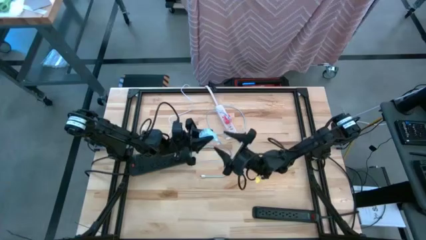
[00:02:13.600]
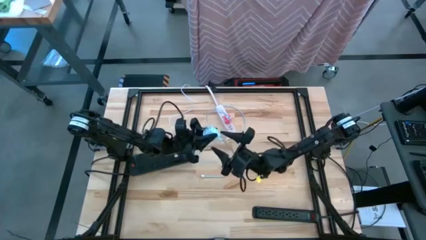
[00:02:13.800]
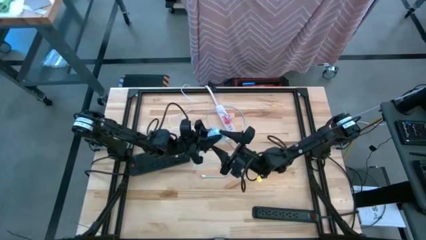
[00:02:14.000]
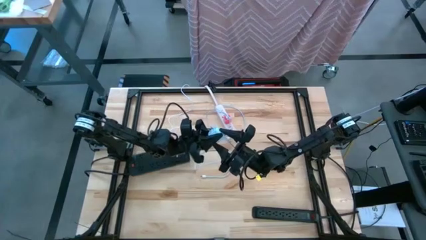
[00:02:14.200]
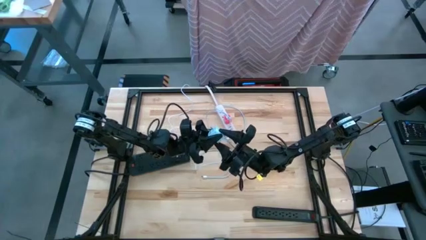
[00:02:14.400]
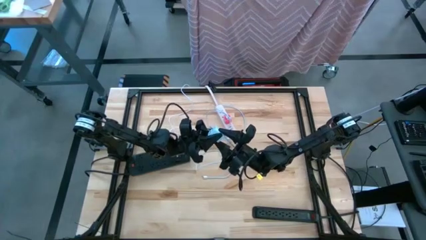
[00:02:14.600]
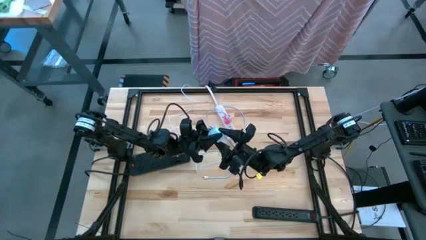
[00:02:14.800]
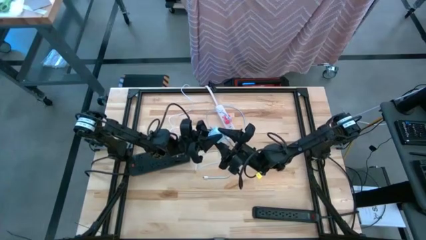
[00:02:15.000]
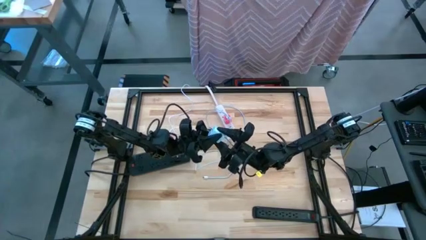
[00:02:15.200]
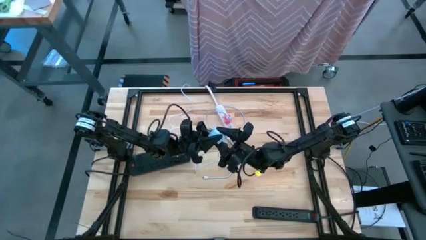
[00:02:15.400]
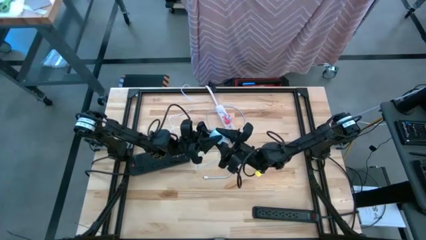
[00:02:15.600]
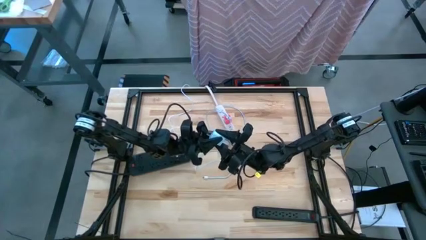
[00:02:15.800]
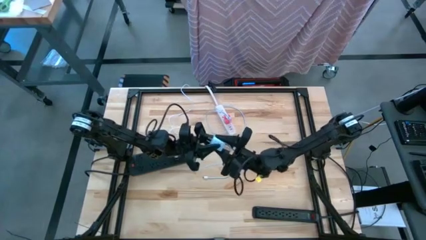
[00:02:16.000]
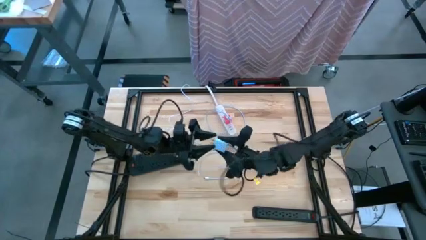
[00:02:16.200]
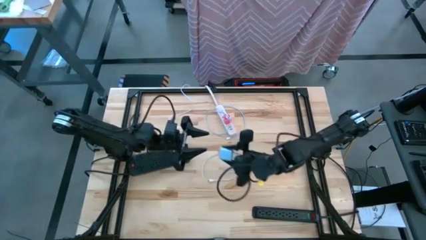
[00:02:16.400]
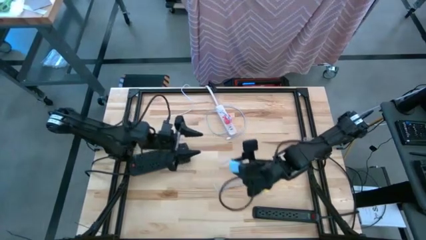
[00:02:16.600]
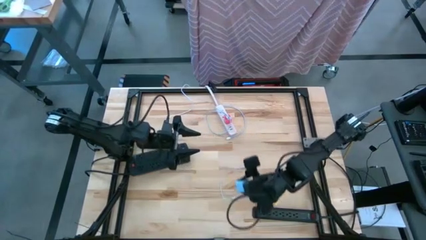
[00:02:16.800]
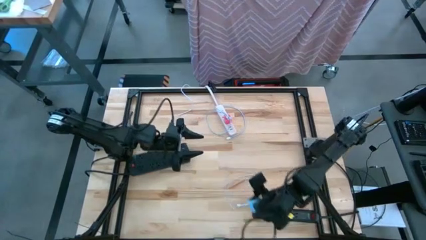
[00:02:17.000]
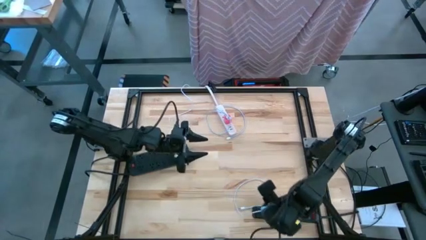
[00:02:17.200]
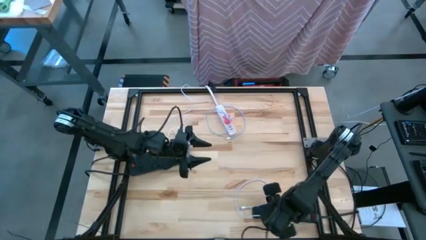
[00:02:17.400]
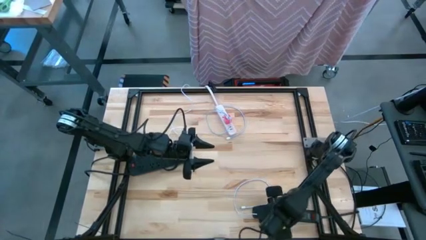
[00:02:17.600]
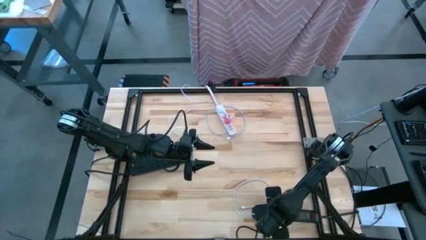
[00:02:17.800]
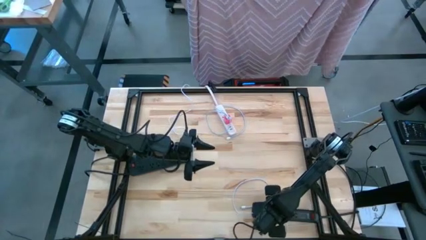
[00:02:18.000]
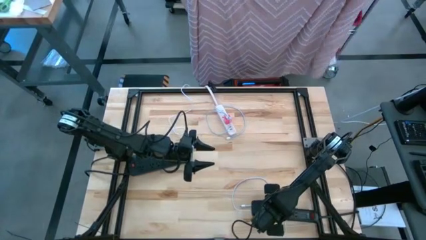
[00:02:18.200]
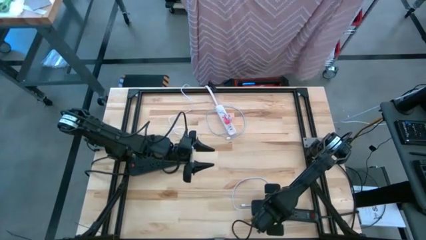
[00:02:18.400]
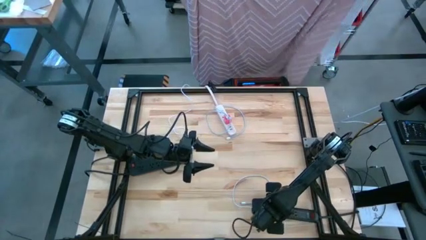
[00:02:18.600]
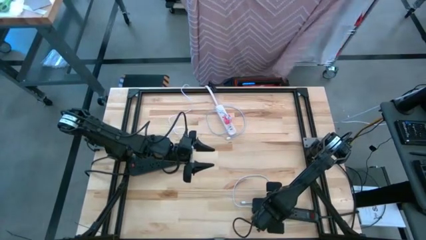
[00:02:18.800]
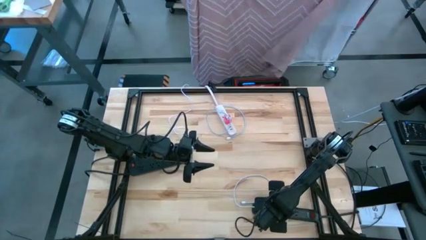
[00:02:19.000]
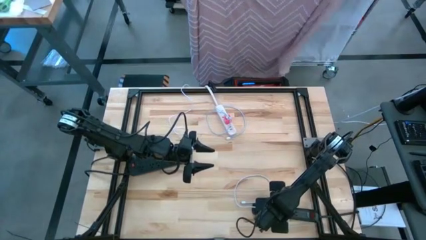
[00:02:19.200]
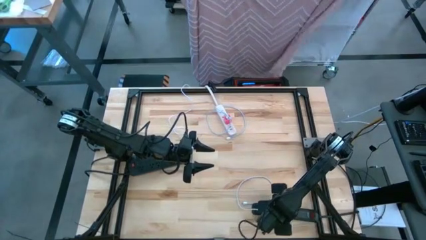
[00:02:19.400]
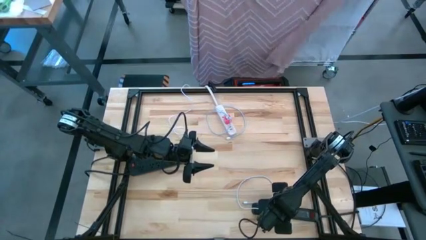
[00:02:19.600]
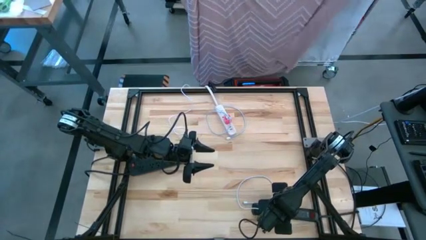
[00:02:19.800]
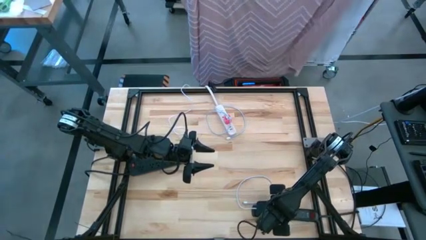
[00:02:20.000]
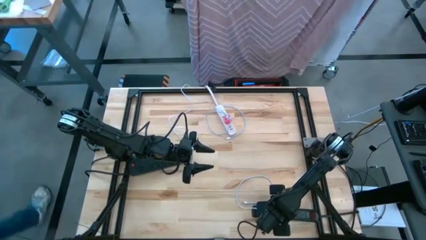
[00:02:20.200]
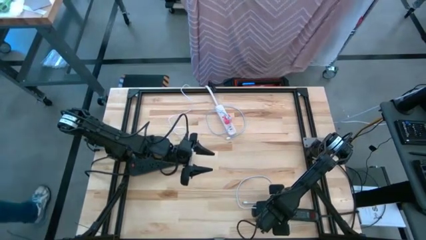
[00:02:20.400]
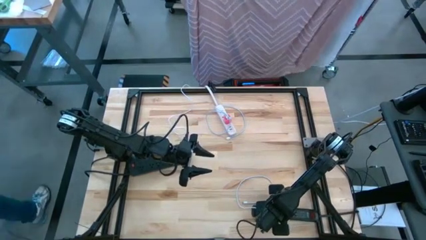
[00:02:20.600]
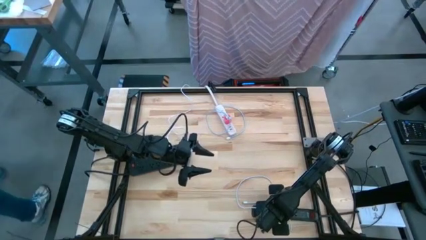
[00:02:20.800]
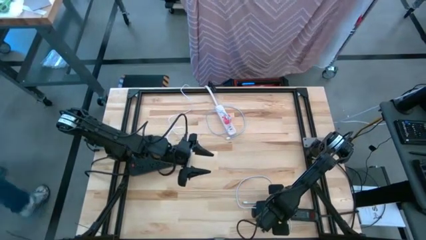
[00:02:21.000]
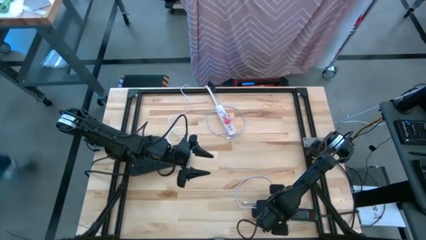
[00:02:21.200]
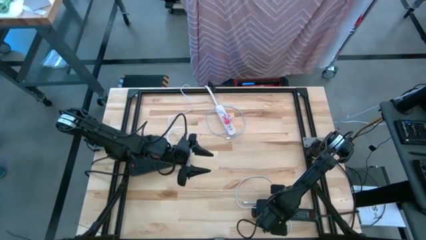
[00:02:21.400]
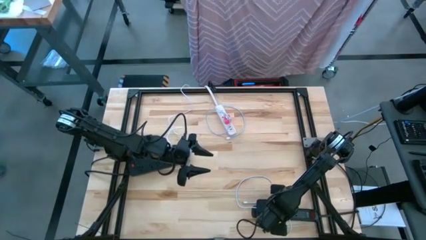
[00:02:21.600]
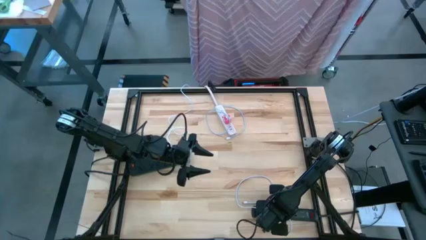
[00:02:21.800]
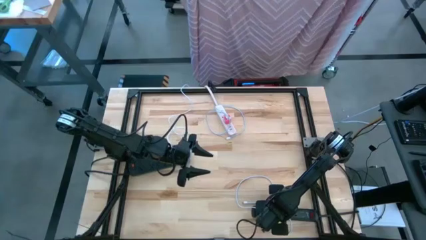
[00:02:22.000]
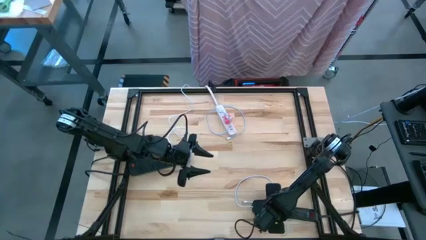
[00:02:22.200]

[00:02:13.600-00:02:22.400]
Task: Insert USB
Insert the white charger adapter into the right black outlet extension

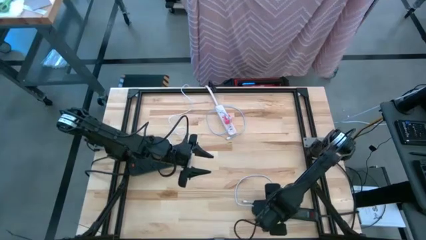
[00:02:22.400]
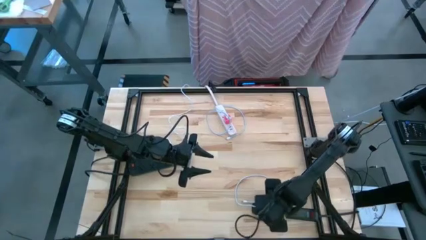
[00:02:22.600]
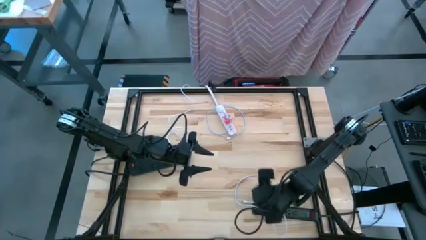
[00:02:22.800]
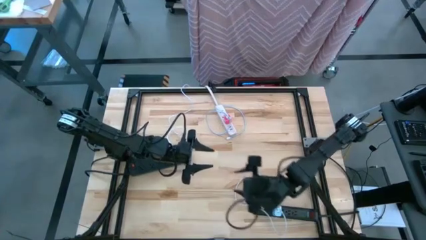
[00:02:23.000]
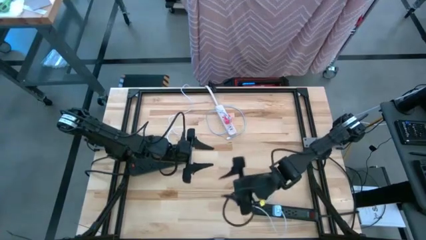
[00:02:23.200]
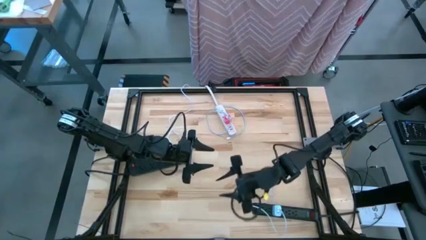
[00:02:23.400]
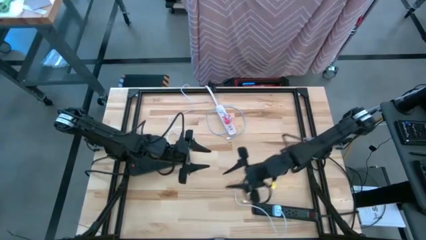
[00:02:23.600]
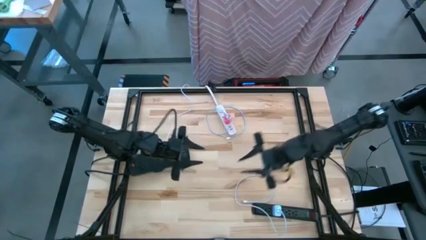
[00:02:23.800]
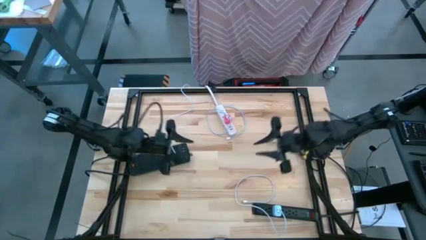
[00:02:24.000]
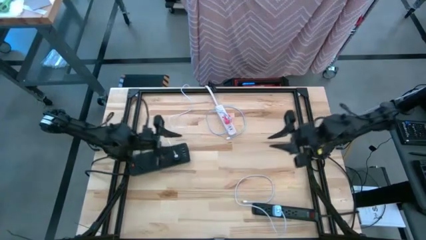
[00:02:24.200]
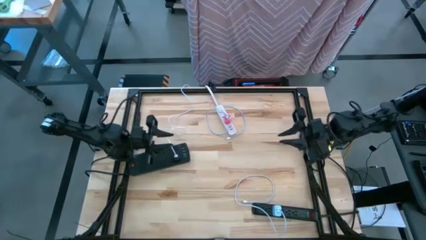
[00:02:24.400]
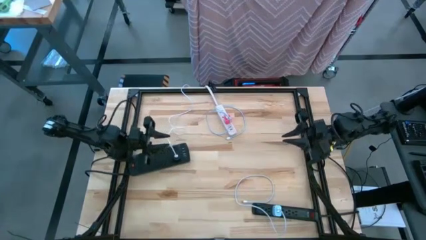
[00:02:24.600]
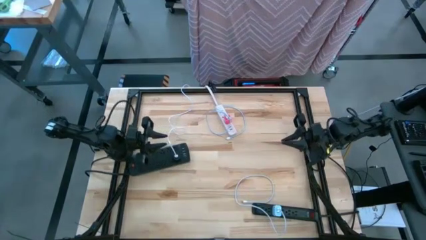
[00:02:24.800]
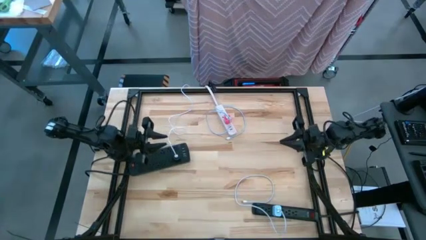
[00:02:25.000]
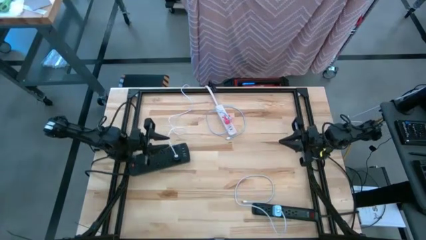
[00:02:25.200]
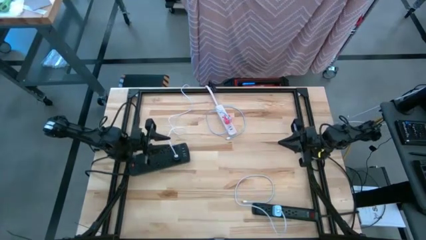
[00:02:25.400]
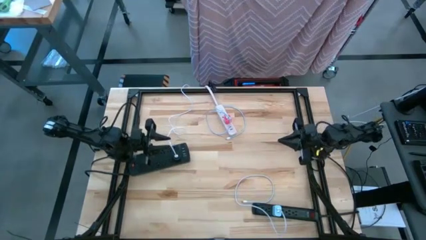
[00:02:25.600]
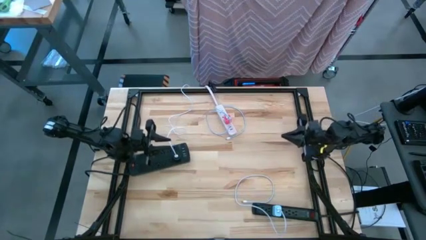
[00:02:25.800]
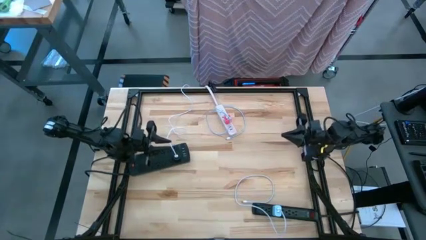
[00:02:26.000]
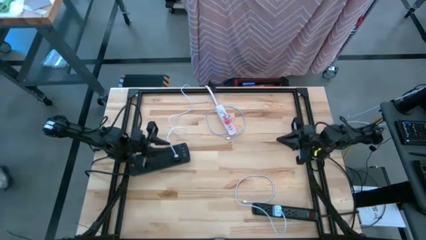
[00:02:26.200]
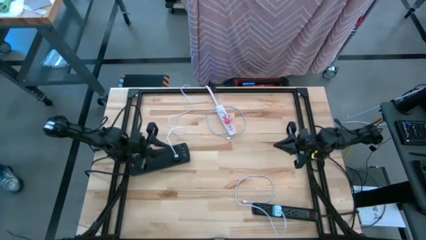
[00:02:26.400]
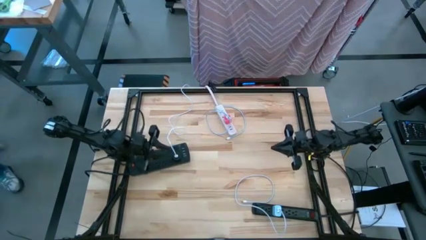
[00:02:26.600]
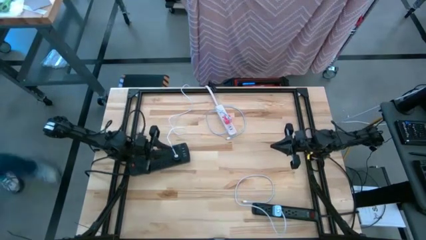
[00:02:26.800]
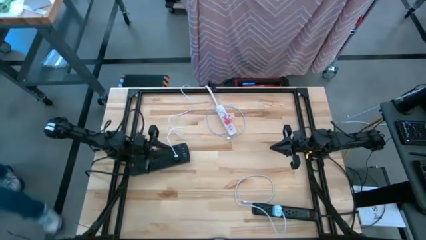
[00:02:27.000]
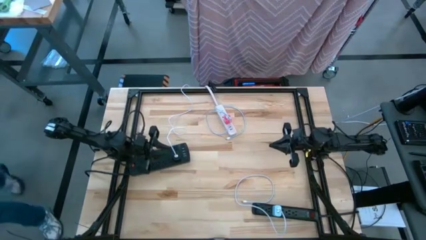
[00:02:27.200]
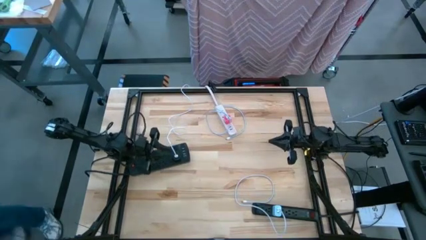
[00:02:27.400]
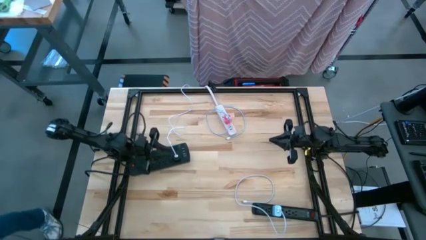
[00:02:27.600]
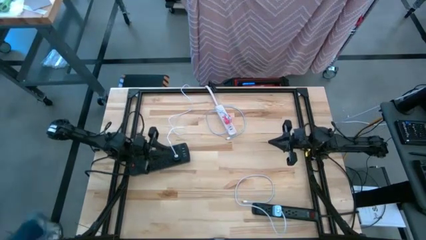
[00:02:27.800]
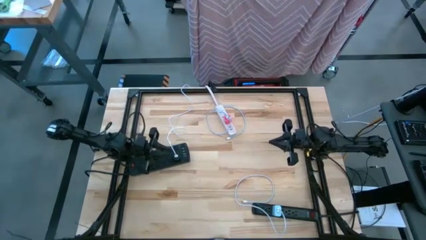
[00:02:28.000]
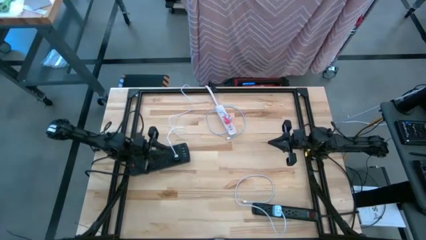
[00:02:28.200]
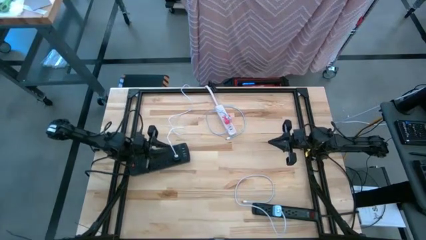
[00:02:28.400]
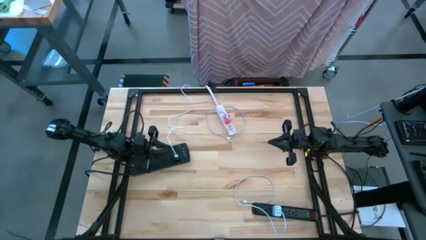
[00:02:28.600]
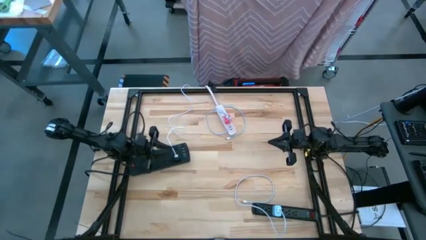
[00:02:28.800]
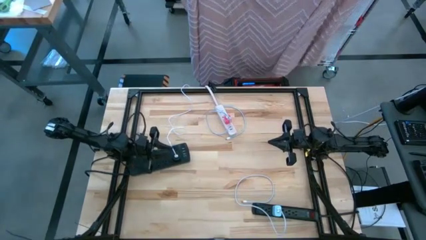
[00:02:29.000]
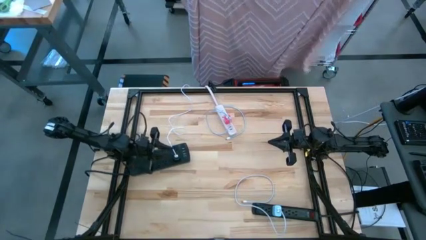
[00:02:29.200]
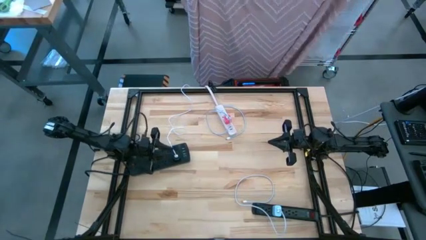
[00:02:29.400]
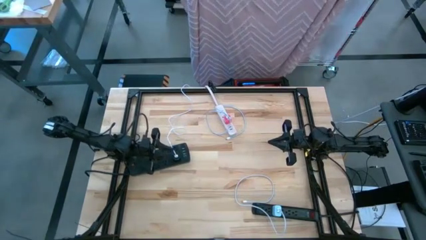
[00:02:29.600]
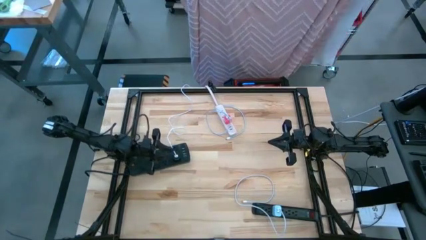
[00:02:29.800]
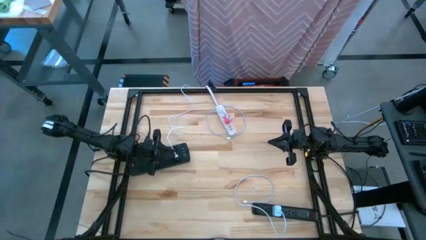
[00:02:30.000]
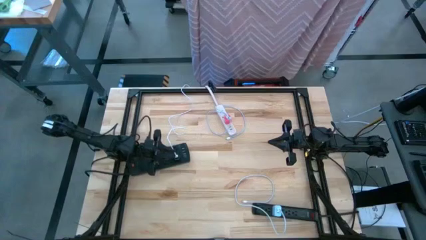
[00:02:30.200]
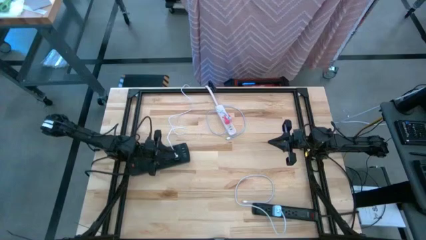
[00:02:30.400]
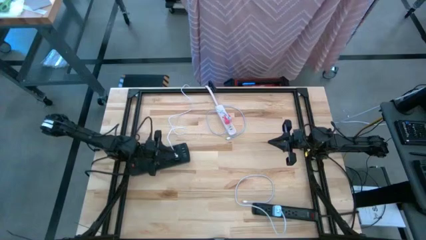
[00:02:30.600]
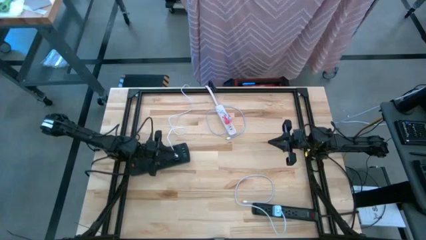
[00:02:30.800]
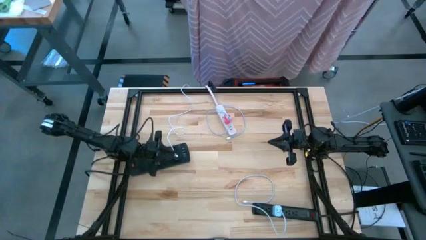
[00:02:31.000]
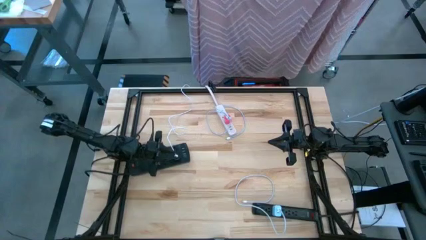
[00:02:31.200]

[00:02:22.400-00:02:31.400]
Return to Home Position
